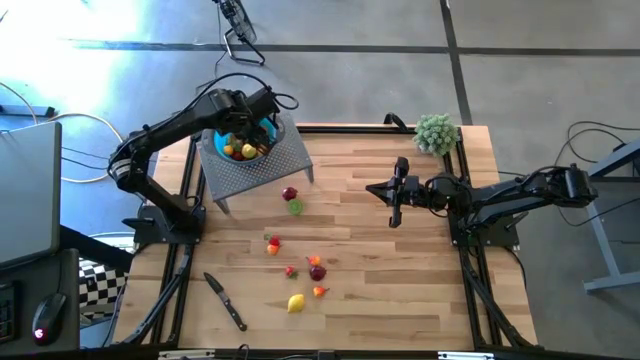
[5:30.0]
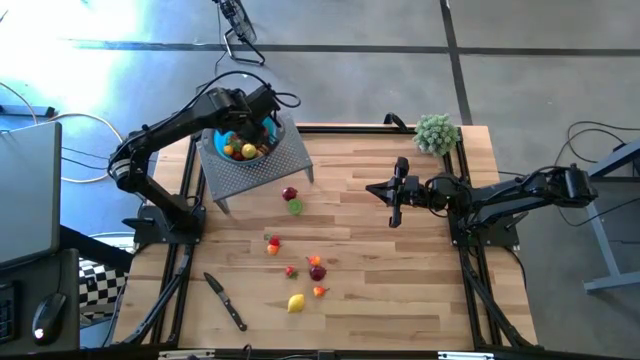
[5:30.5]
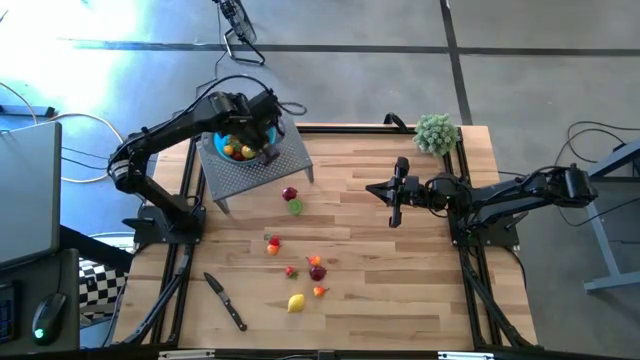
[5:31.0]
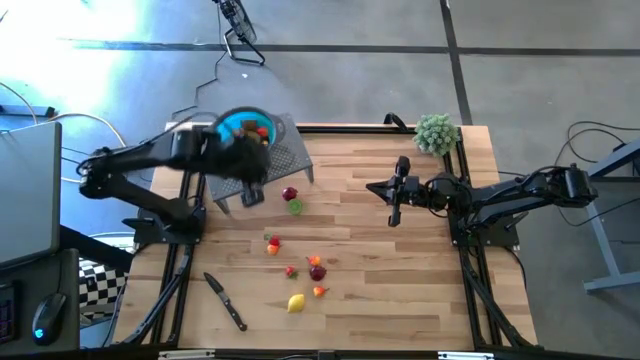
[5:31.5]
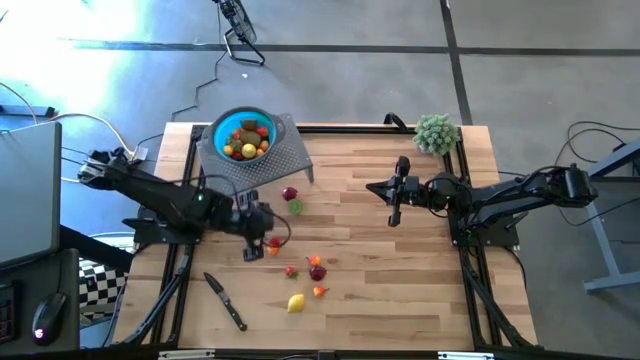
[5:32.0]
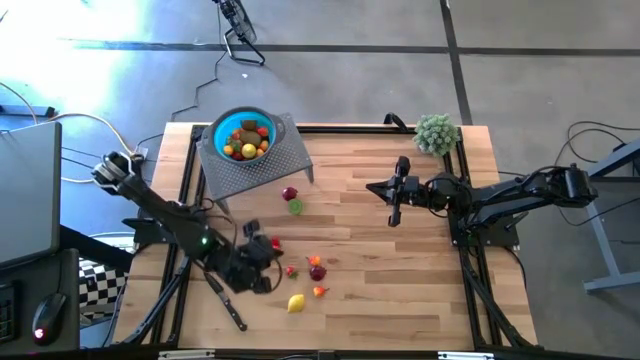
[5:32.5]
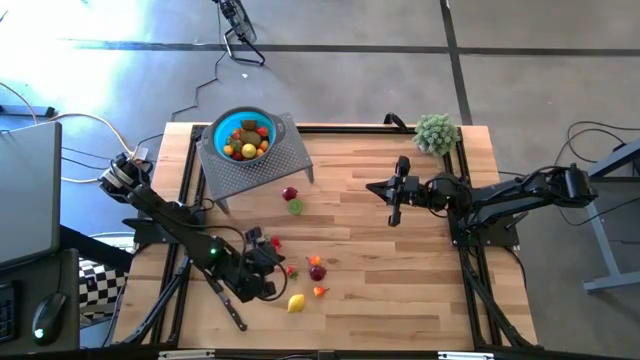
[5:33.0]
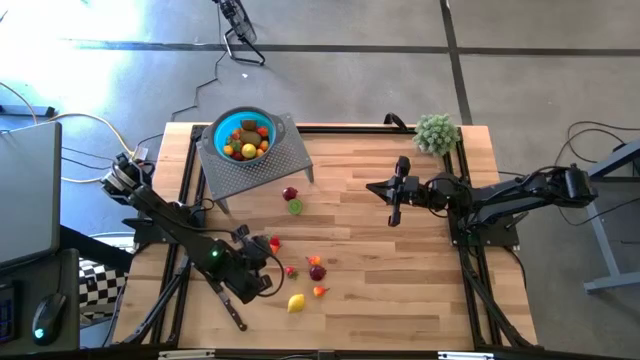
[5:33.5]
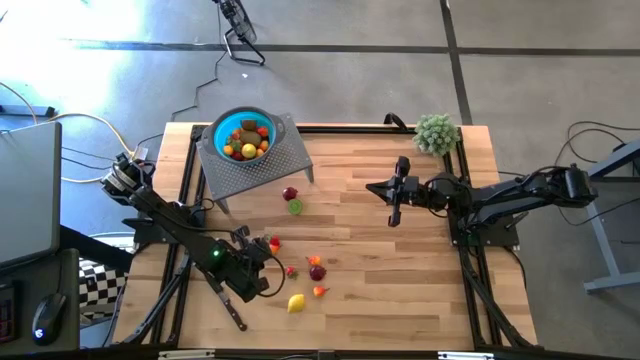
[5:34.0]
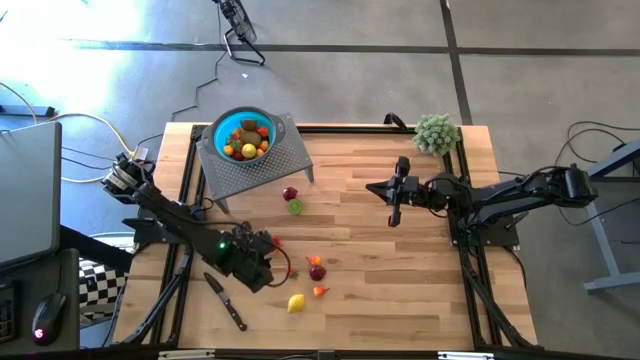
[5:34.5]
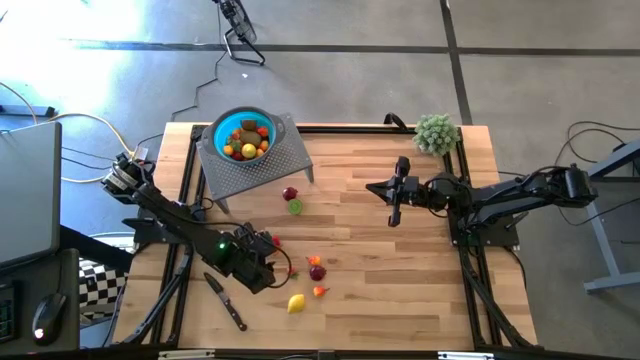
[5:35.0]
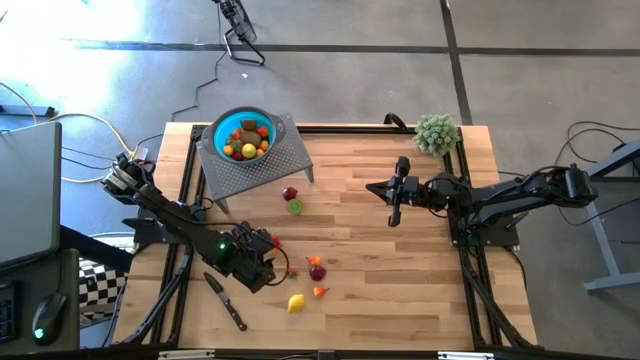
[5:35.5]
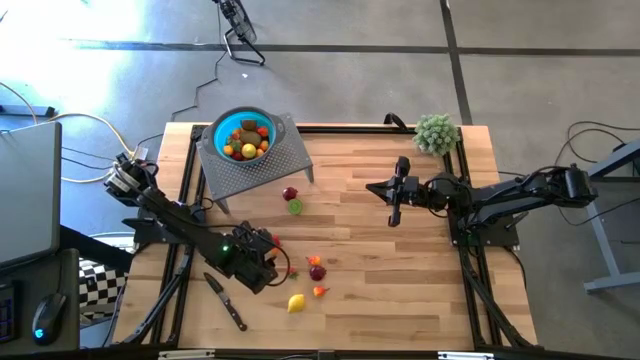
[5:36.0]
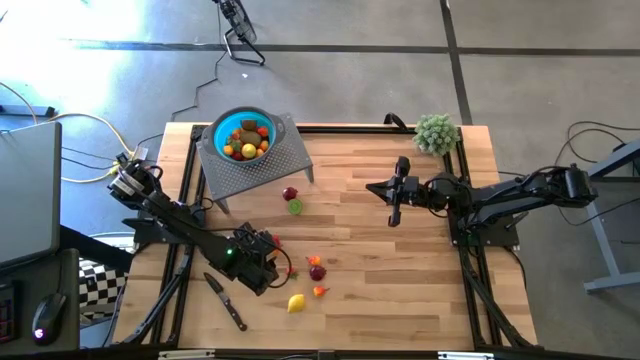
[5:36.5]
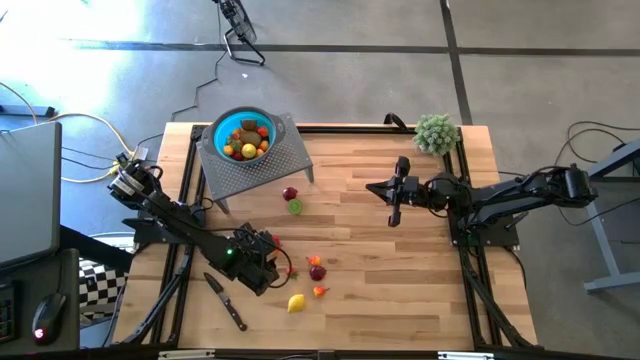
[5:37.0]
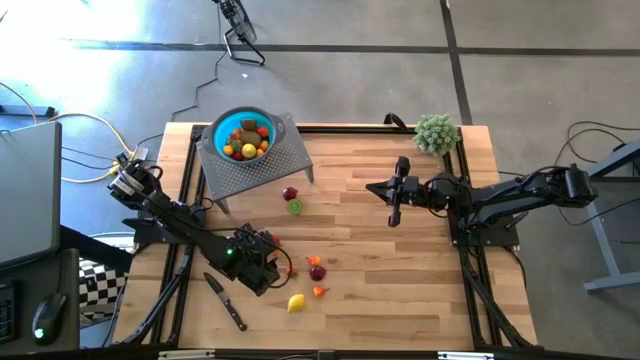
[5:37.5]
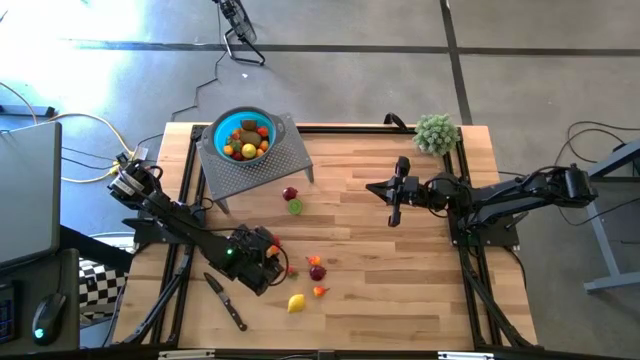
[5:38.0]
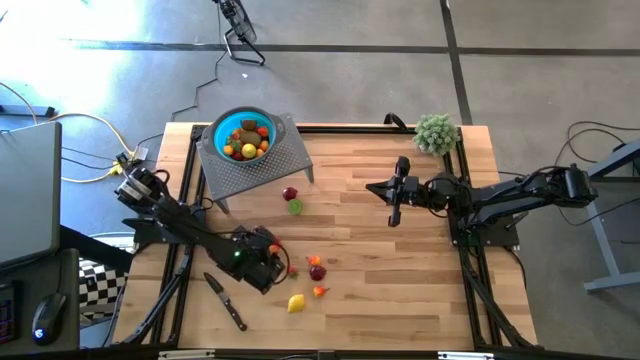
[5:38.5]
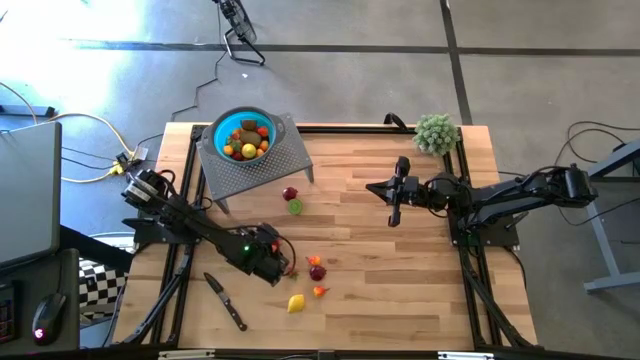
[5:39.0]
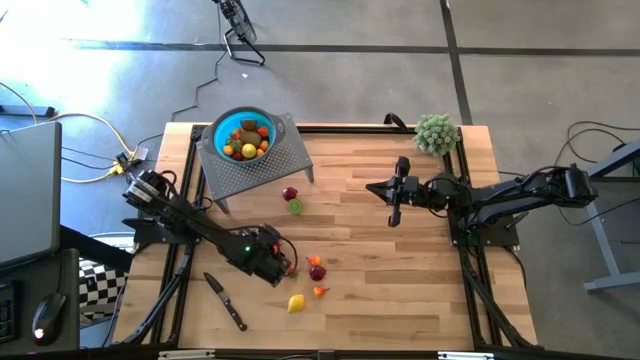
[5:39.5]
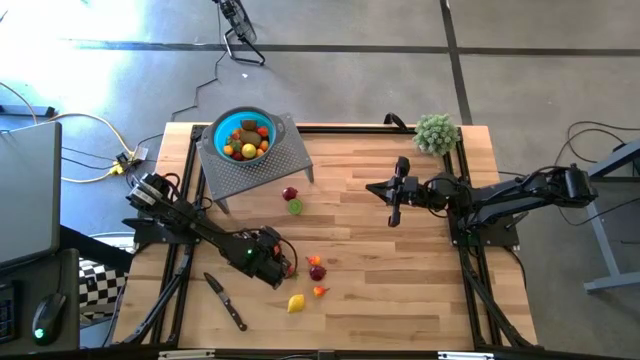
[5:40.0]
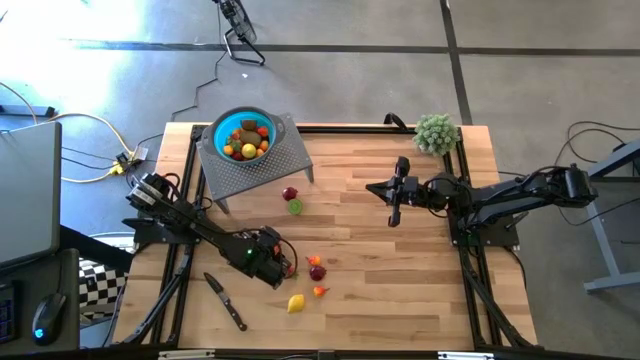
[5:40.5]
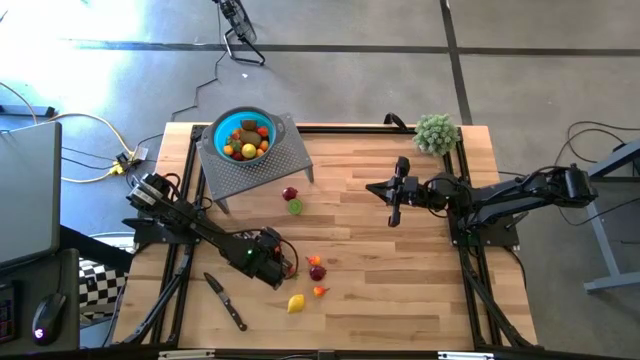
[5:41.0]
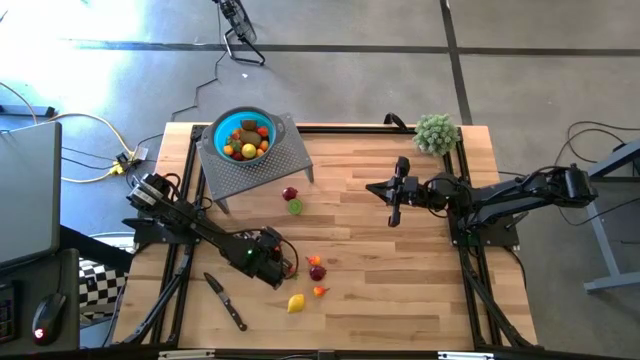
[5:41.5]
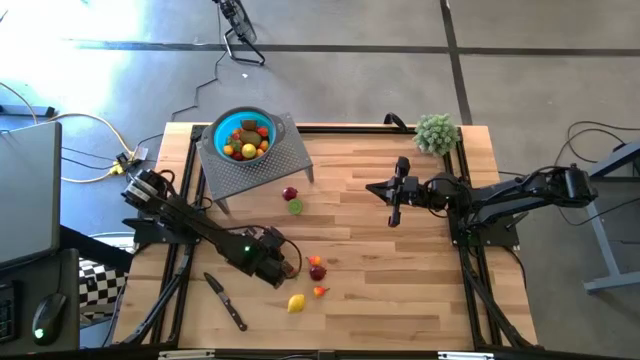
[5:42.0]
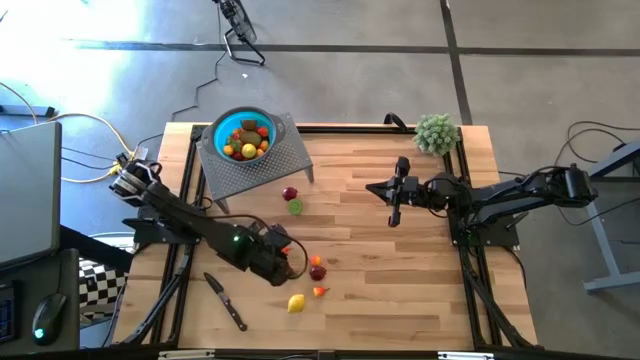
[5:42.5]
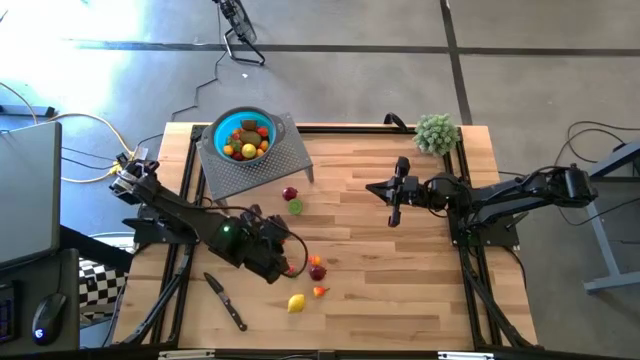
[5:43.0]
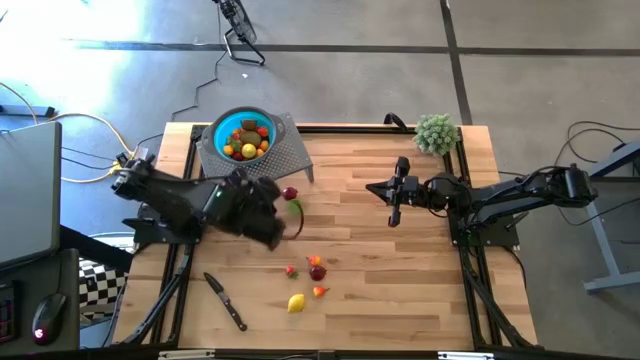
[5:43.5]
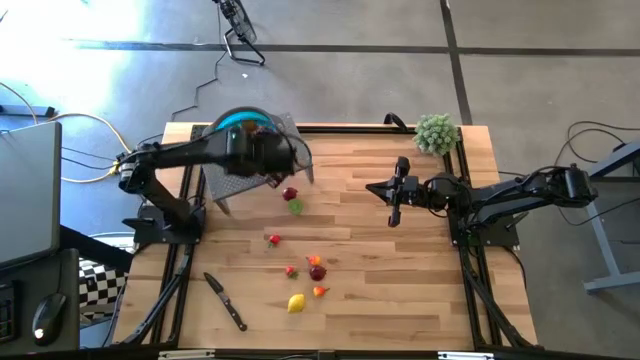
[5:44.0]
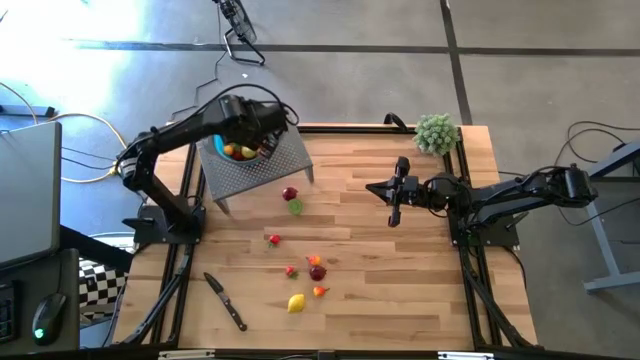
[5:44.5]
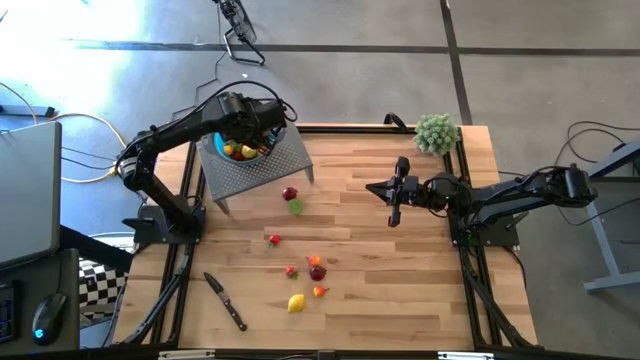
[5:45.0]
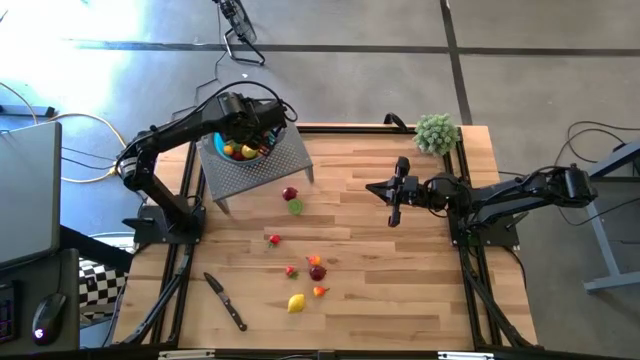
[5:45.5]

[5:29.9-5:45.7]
Task: Pick & Place Fruit
Put the orange pear into the blue strainer bowl on the shelf

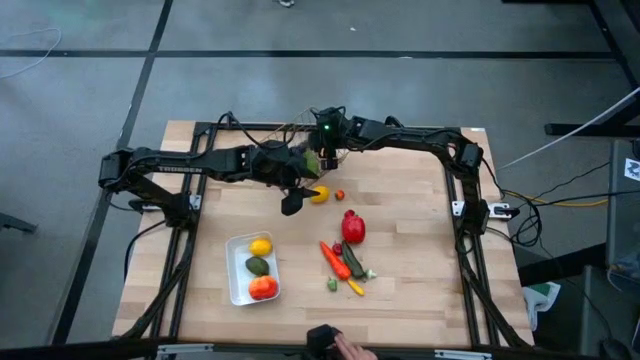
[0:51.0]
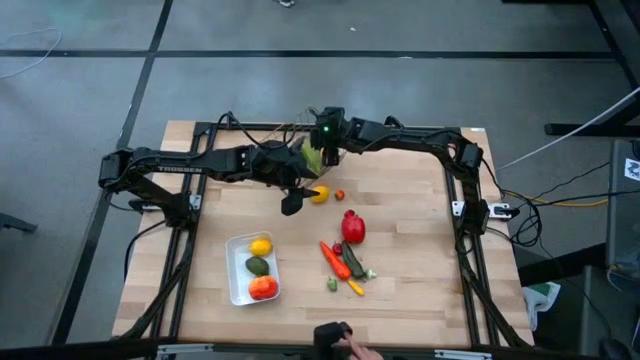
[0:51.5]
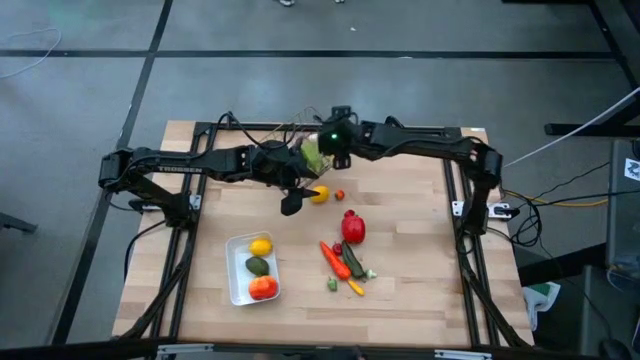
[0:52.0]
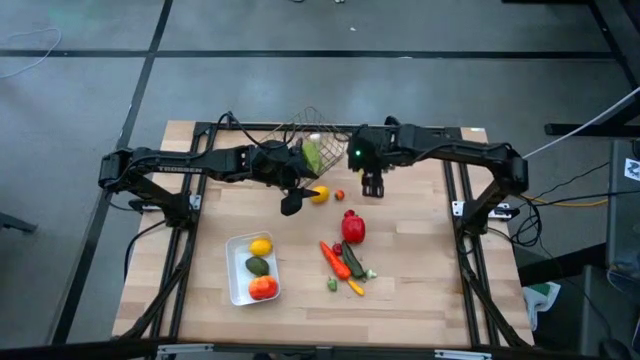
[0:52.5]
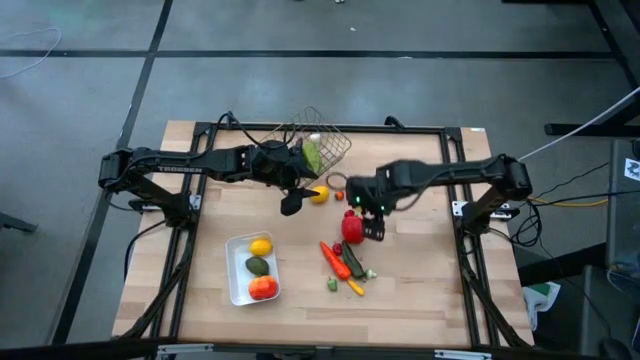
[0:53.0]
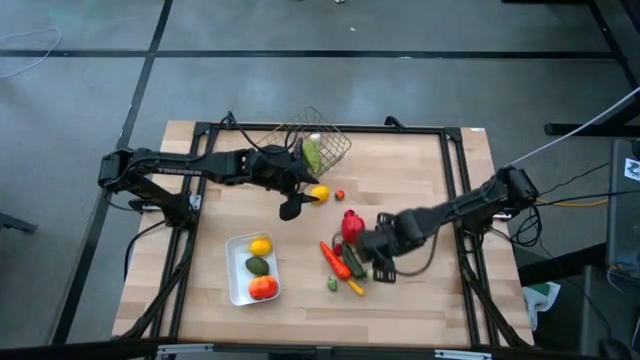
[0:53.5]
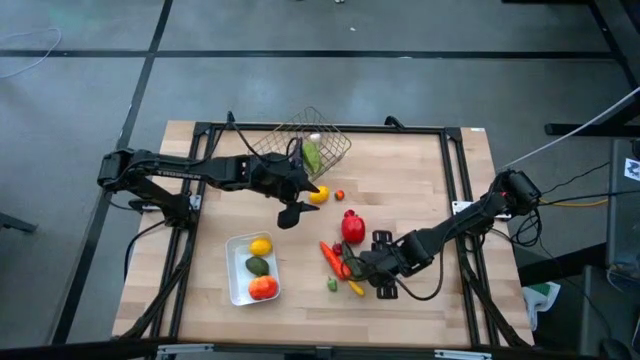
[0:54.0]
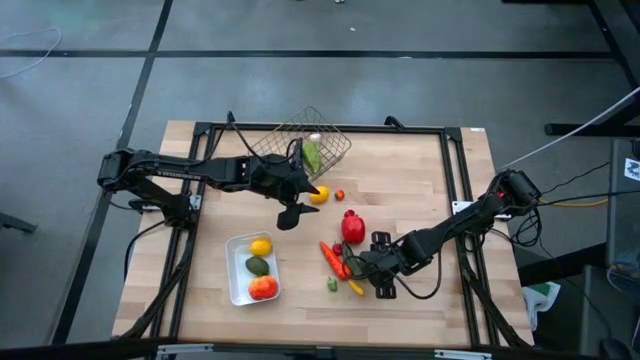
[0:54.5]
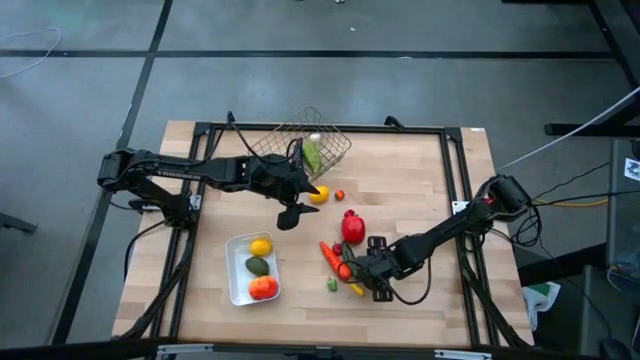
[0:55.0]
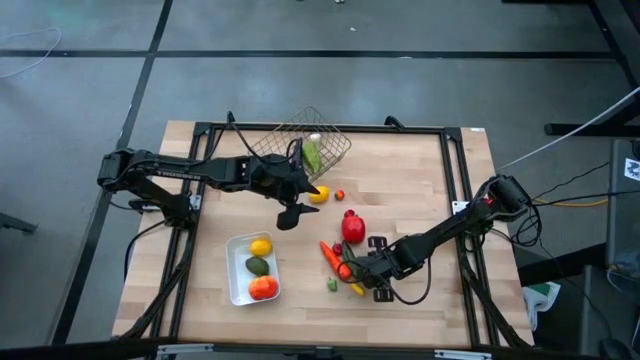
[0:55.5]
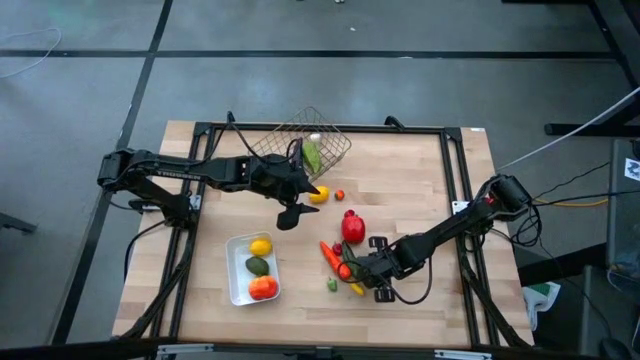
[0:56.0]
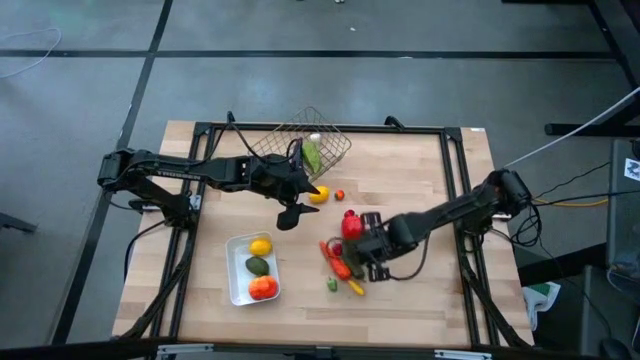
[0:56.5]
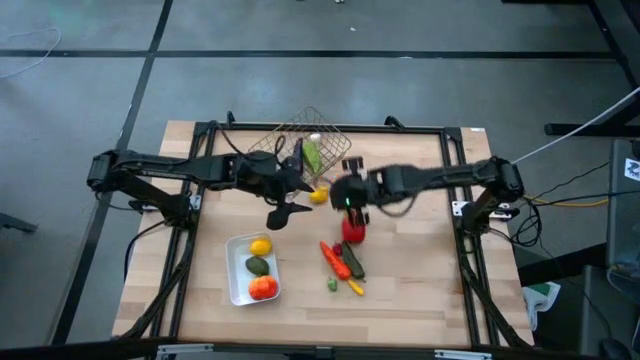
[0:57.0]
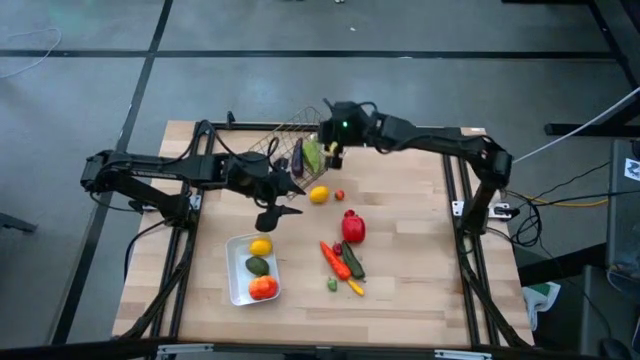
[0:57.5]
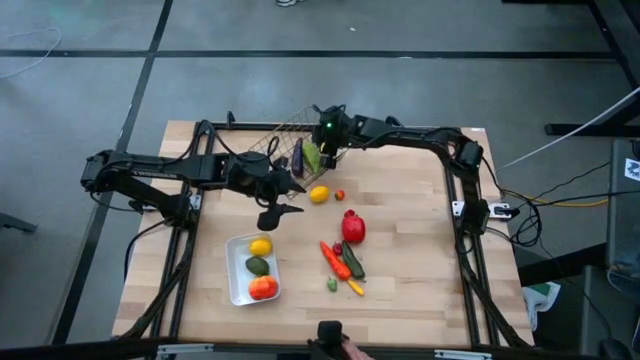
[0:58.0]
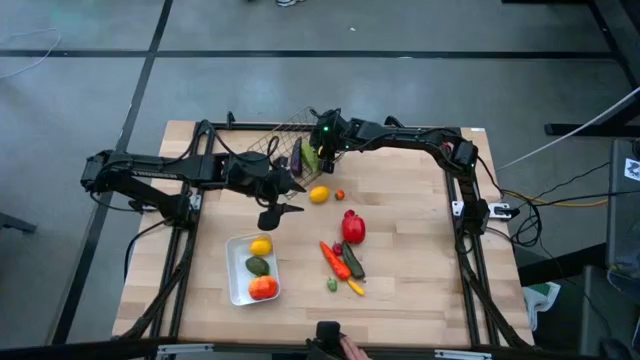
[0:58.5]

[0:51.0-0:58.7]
Task: Sort produce into baskets
Put the green mushroom into the gold wire basket
